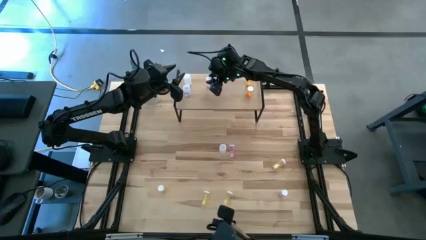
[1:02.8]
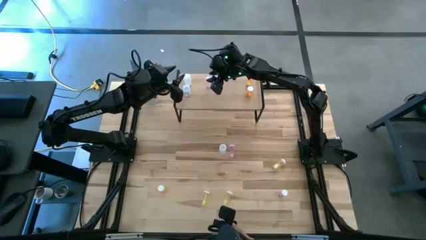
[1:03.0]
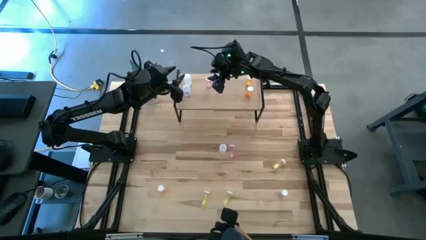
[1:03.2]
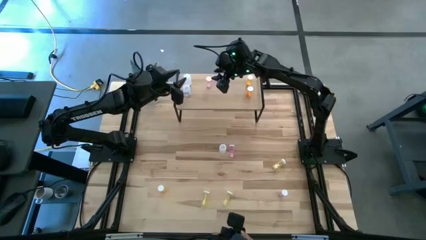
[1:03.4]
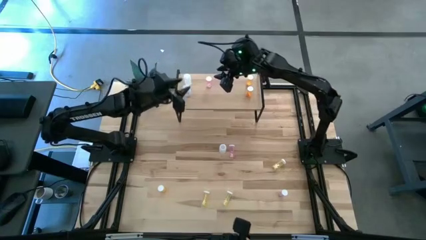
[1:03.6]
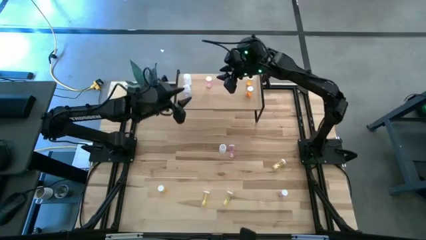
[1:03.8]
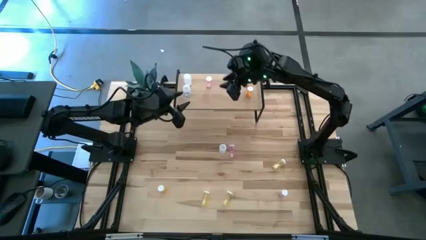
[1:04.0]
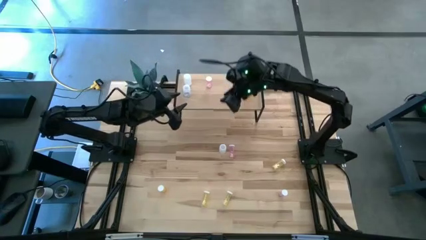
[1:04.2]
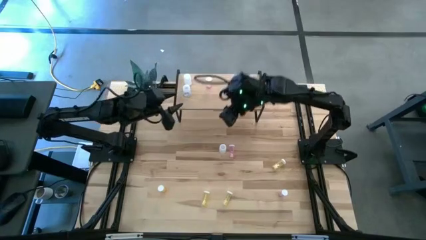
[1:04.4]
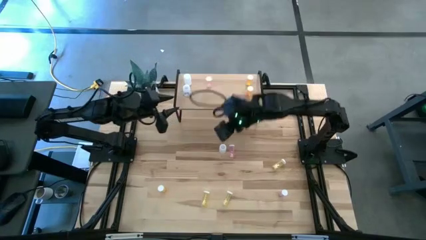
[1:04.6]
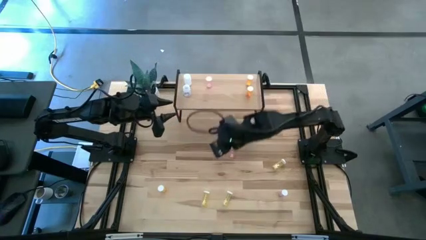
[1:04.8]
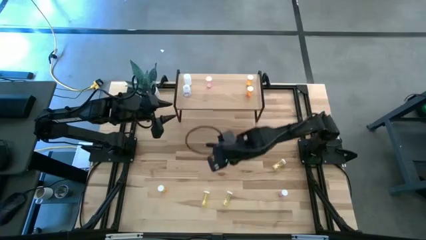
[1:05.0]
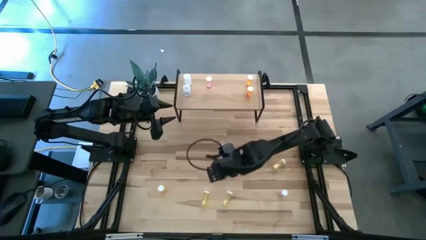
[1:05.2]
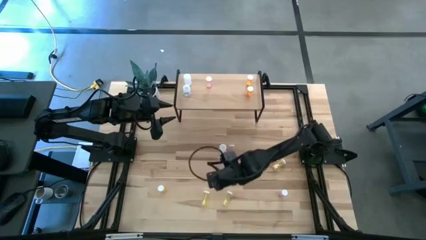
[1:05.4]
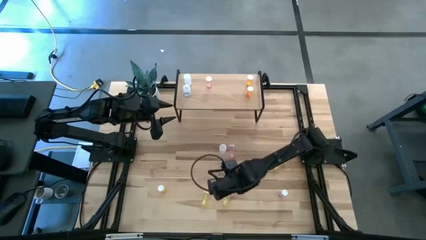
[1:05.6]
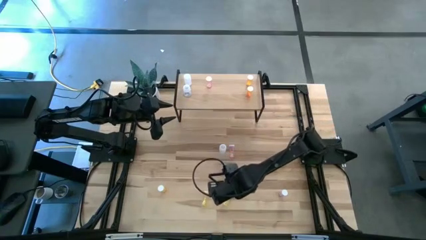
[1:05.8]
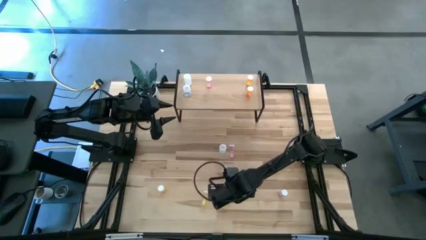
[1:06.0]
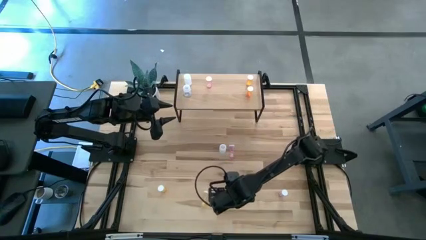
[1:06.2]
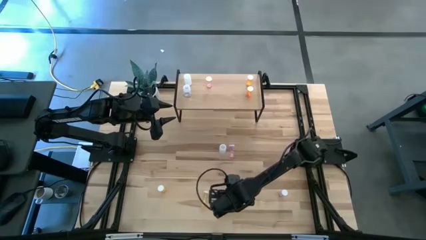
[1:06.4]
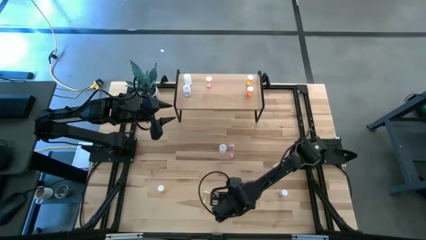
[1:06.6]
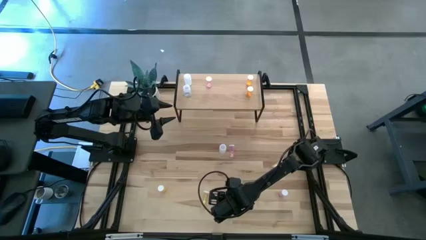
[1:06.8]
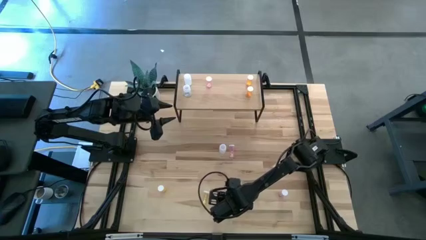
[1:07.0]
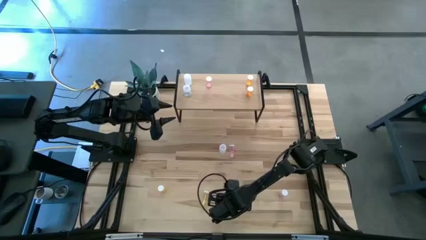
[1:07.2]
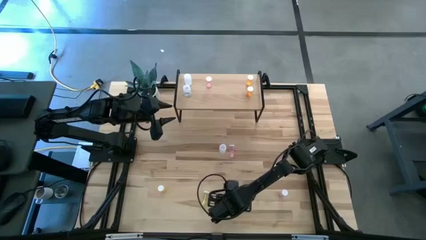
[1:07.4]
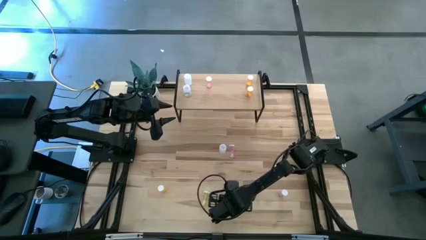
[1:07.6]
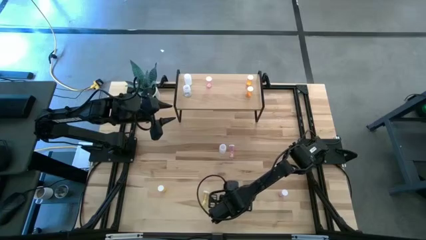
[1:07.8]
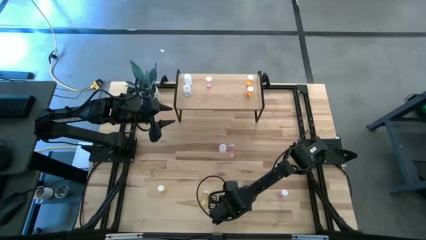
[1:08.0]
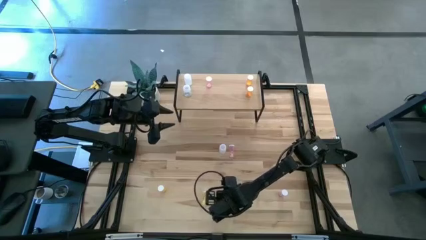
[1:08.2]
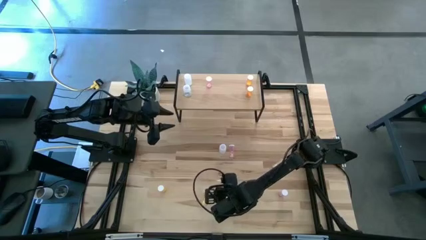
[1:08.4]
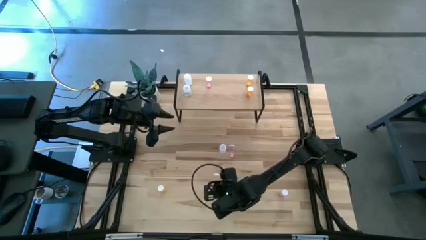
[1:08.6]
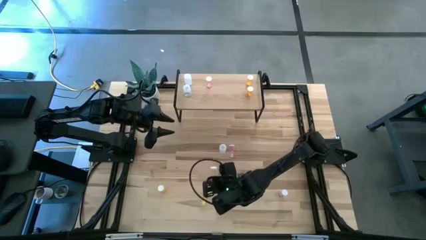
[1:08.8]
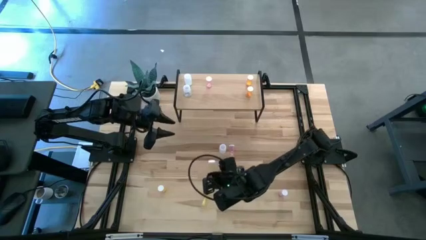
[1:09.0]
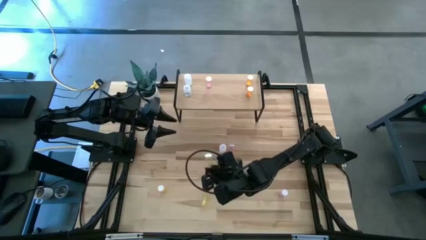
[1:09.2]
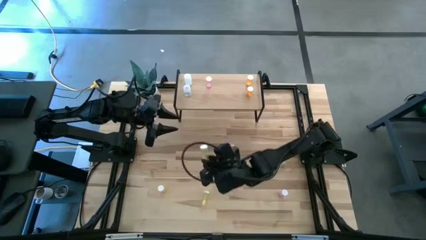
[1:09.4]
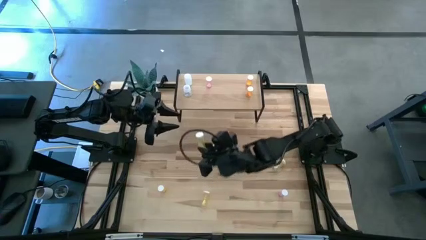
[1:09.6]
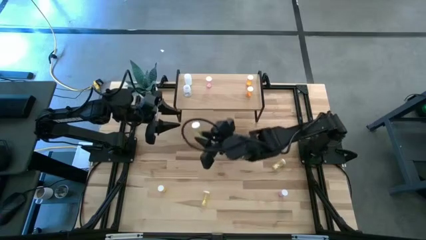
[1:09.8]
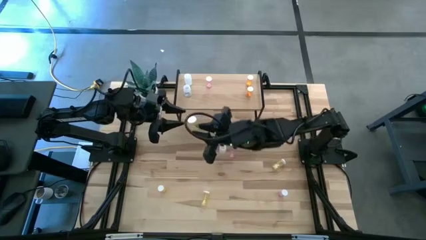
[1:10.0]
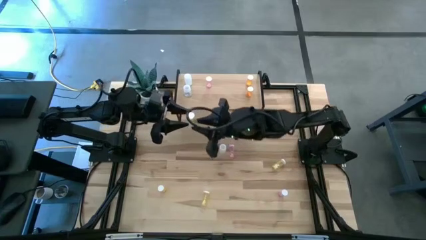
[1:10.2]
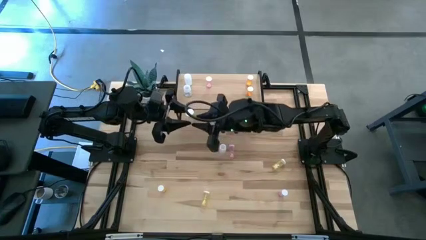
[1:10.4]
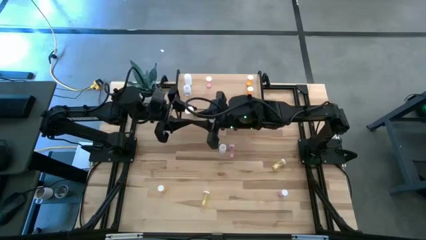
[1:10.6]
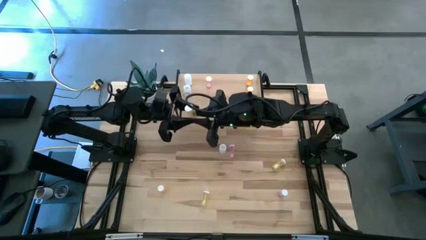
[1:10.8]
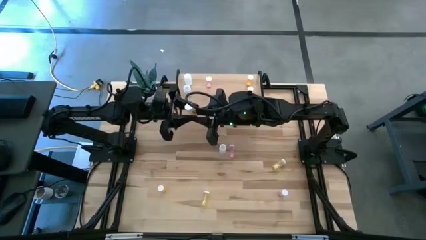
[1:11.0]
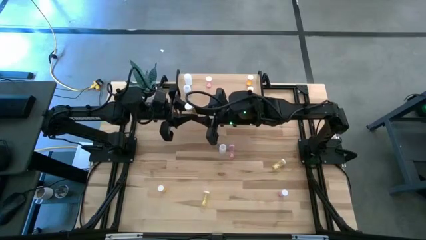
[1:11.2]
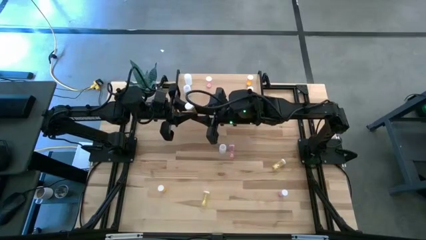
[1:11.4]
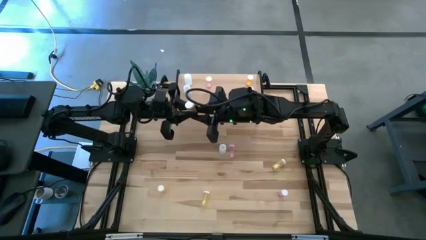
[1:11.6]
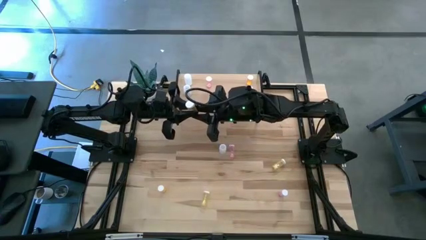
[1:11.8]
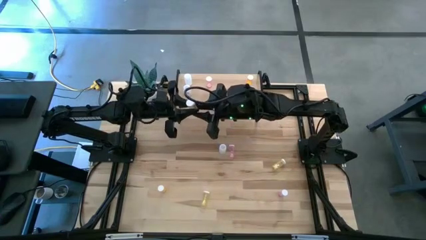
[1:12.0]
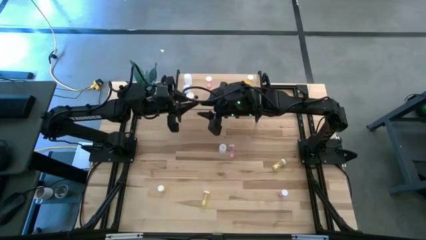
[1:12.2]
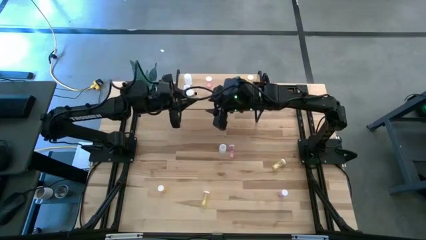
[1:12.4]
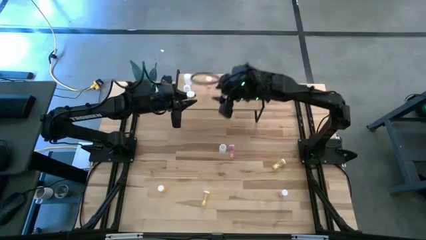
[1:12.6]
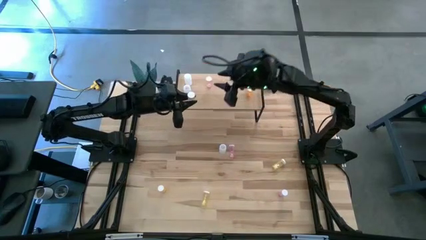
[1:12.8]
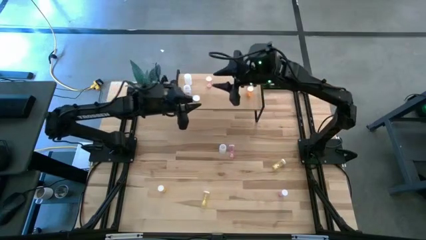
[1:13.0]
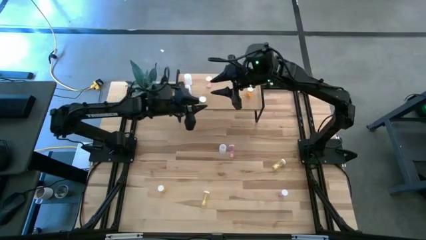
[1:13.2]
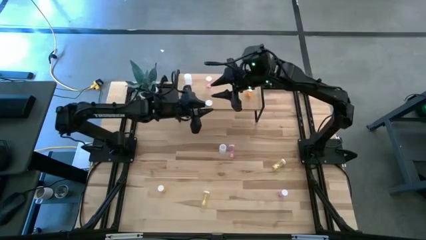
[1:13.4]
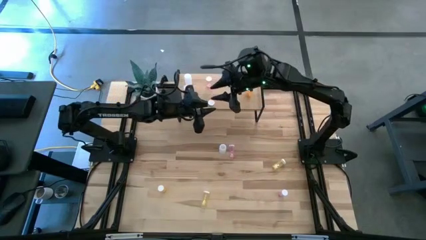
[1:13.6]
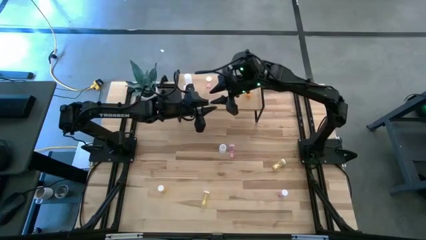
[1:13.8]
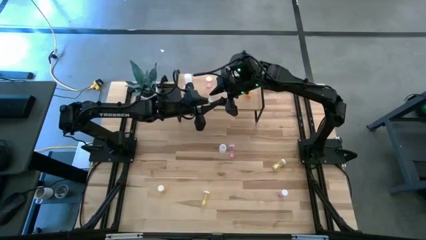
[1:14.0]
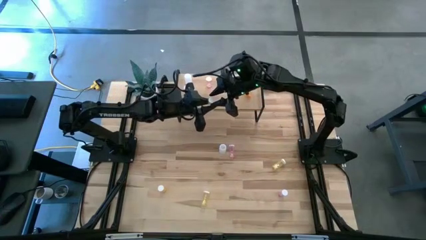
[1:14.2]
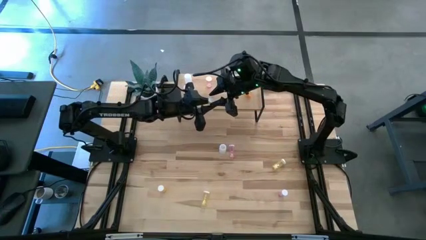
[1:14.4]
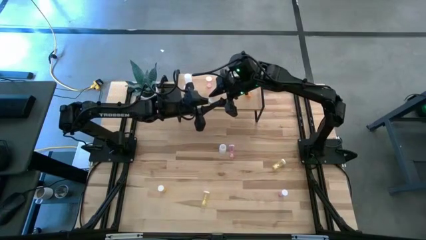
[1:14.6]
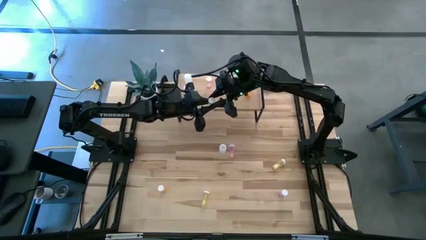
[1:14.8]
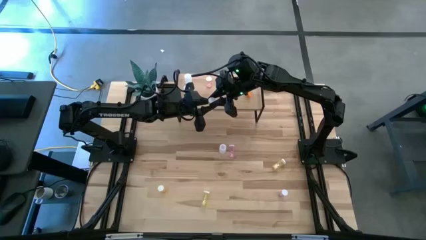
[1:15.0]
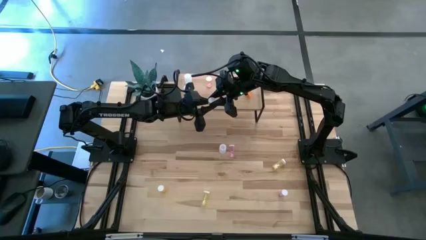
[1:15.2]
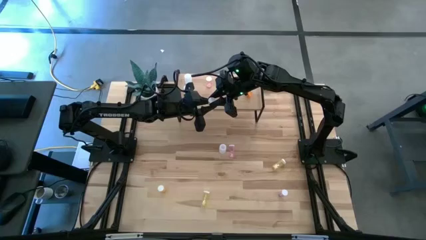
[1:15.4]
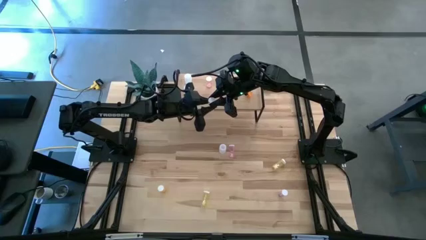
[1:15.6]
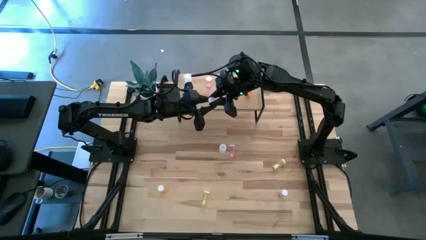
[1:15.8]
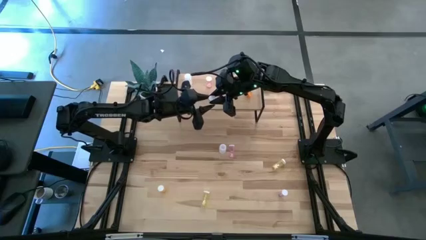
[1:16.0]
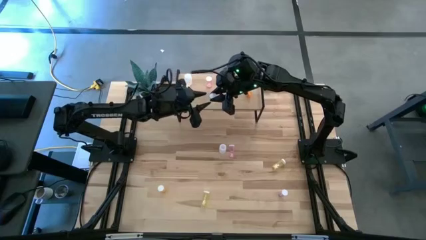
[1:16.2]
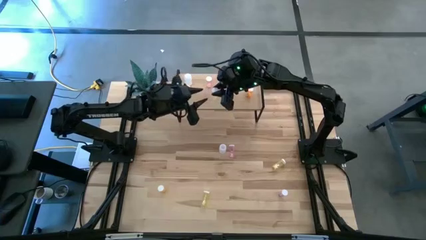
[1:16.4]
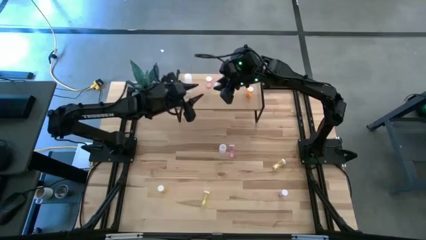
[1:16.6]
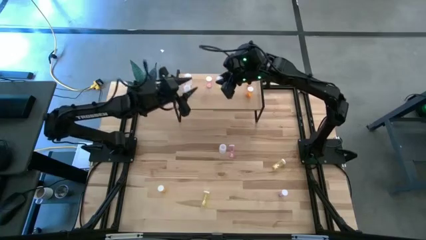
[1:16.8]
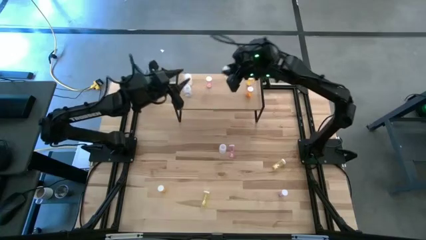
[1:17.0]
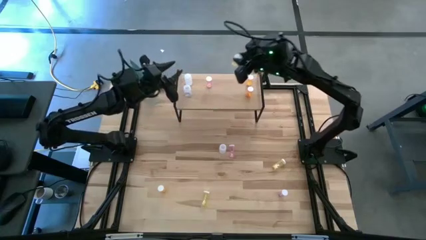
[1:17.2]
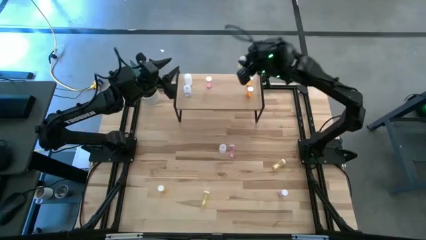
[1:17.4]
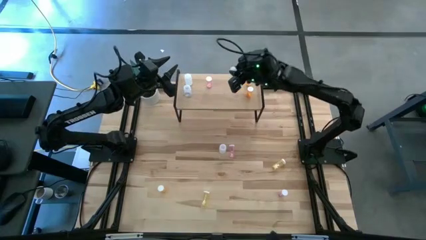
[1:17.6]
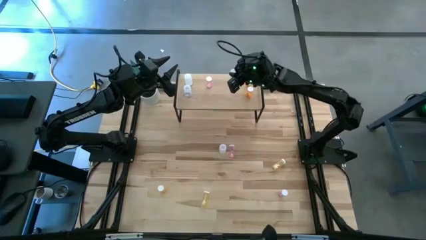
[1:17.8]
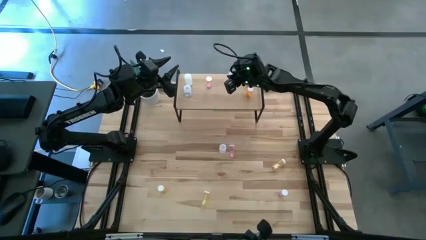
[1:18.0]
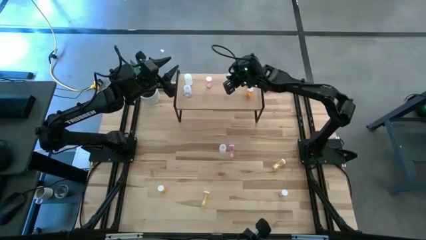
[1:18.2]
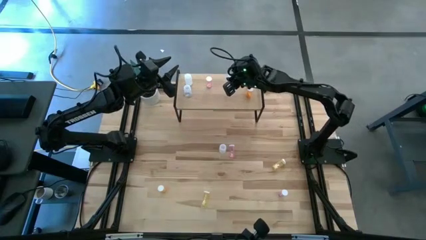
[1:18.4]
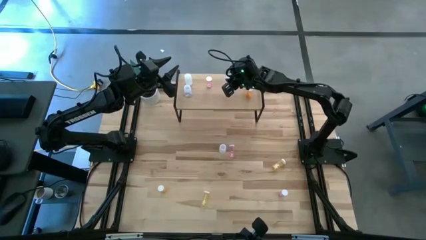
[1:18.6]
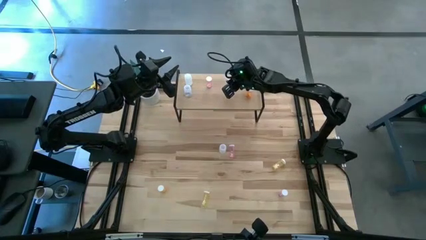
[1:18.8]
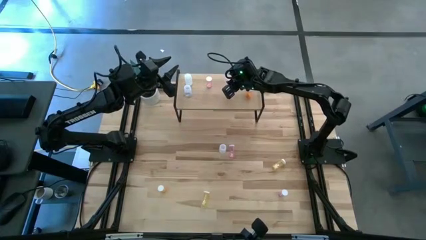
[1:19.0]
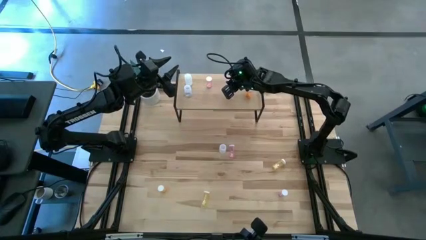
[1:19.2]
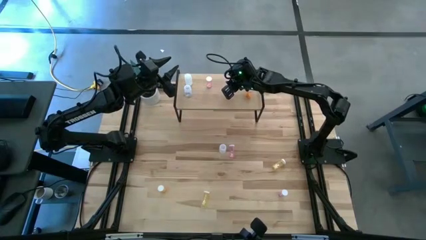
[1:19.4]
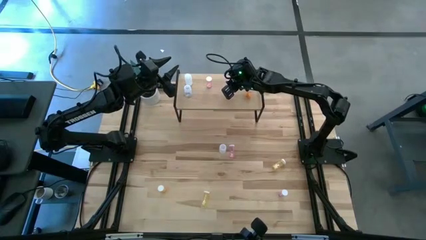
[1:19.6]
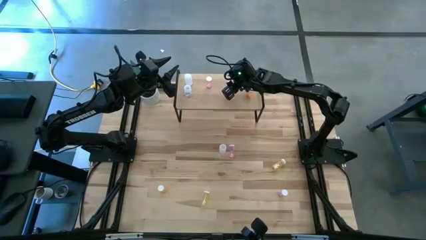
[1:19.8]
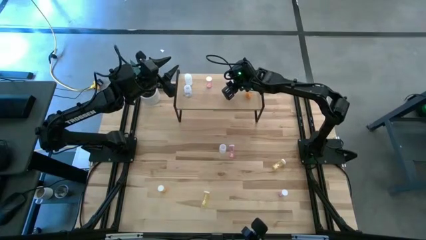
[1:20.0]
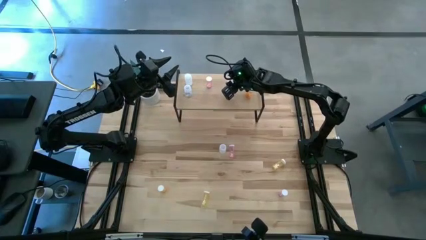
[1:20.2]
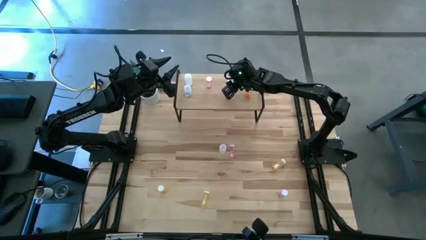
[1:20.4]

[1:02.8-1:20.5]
Task: Pick and place medicine bottles onto shelf by color
Put the bottom right yellow pill bottle on the shelf
